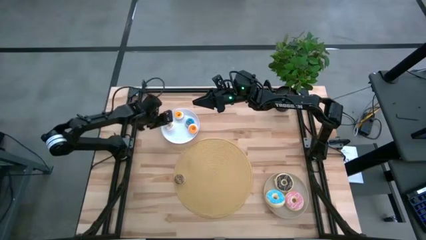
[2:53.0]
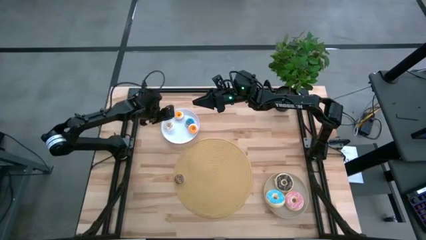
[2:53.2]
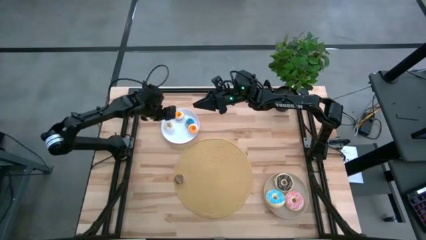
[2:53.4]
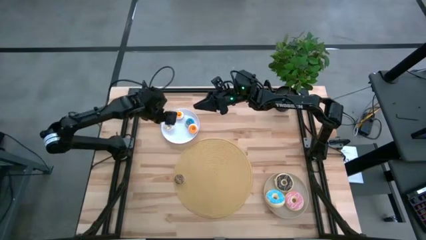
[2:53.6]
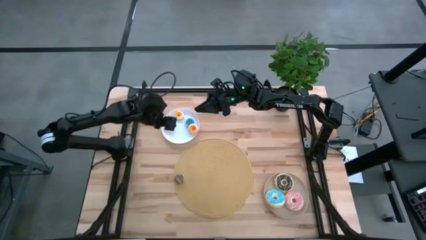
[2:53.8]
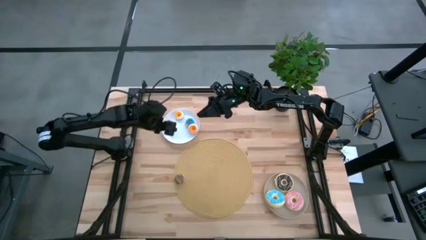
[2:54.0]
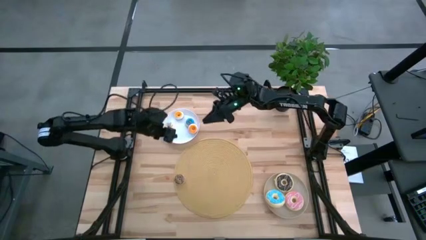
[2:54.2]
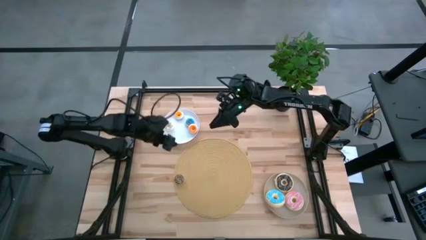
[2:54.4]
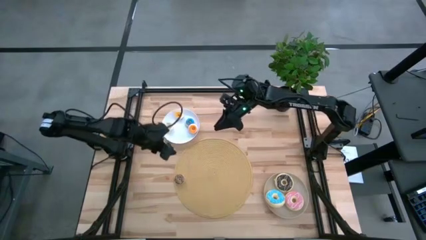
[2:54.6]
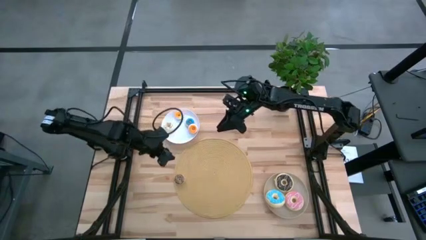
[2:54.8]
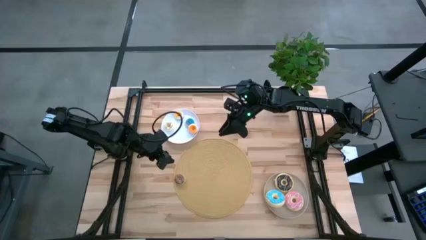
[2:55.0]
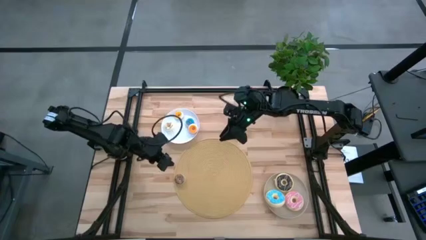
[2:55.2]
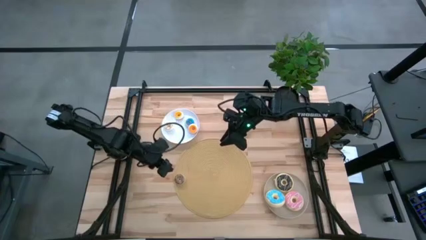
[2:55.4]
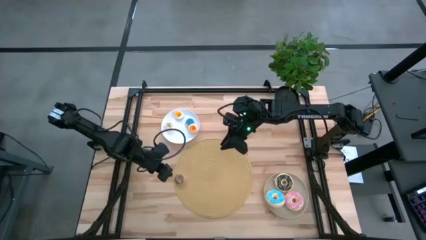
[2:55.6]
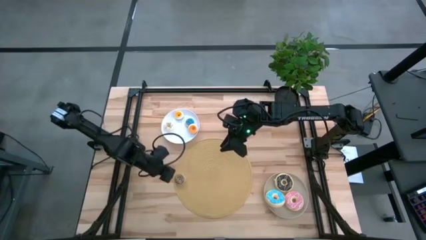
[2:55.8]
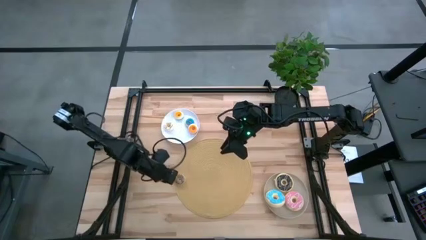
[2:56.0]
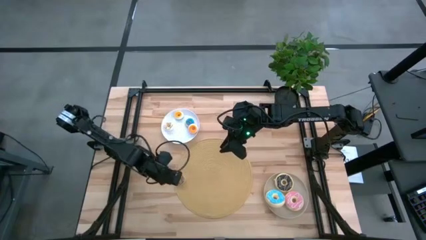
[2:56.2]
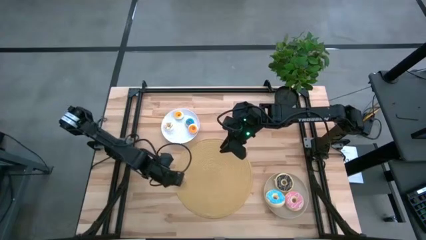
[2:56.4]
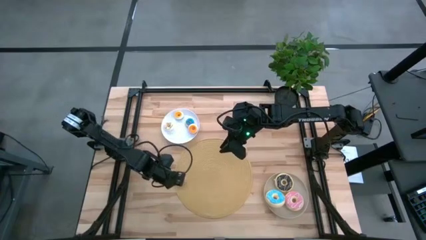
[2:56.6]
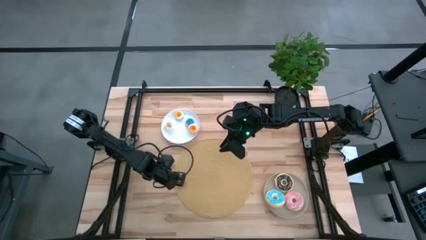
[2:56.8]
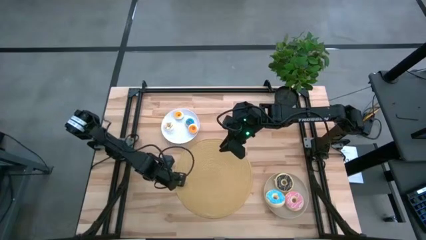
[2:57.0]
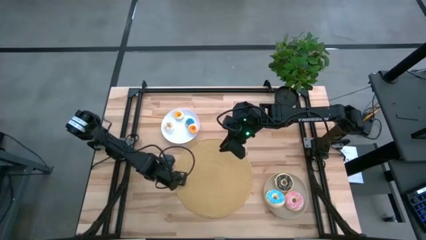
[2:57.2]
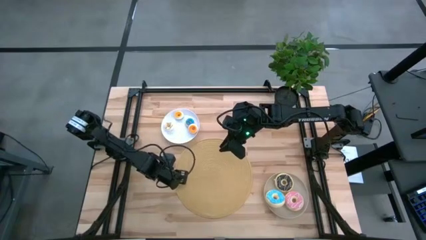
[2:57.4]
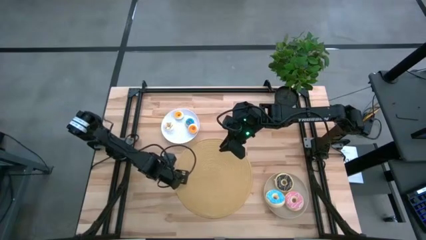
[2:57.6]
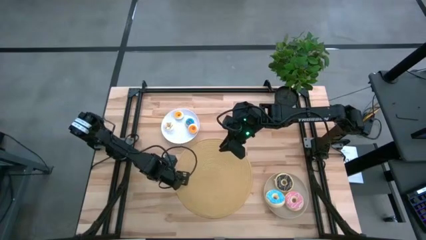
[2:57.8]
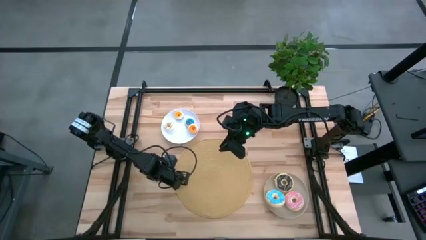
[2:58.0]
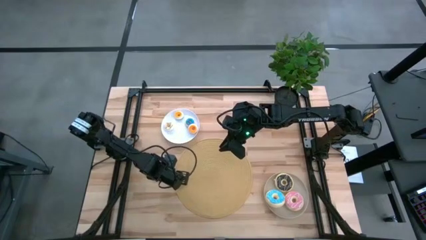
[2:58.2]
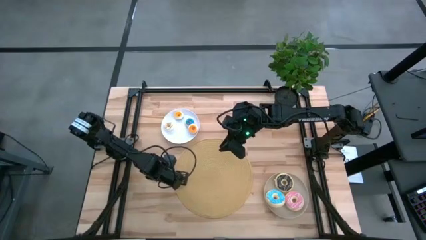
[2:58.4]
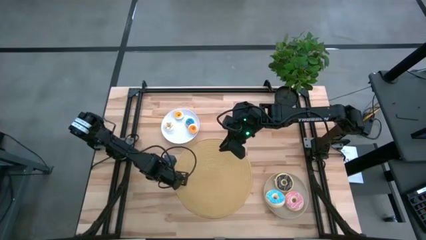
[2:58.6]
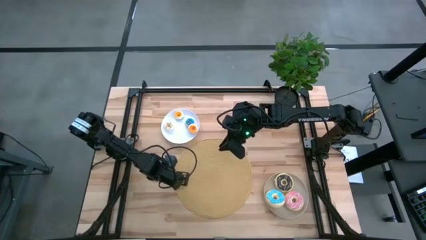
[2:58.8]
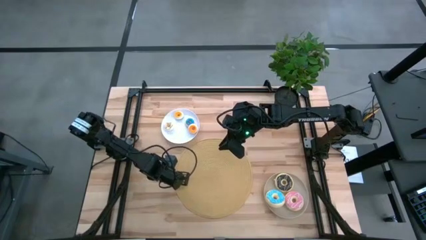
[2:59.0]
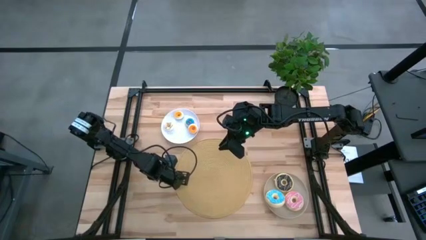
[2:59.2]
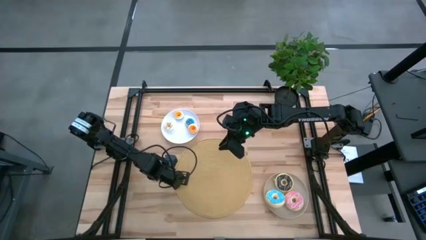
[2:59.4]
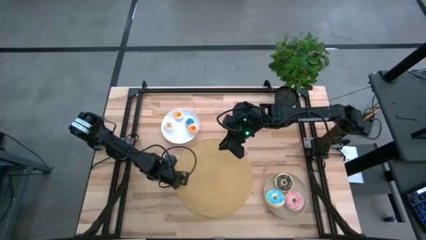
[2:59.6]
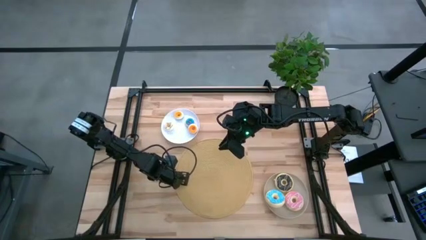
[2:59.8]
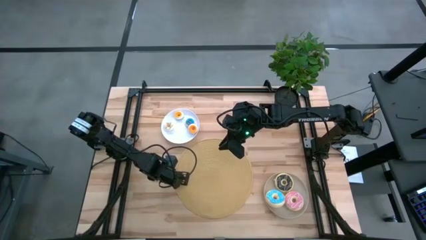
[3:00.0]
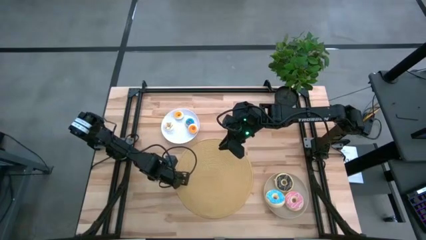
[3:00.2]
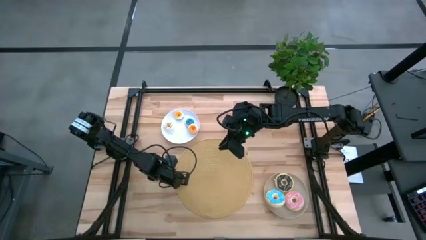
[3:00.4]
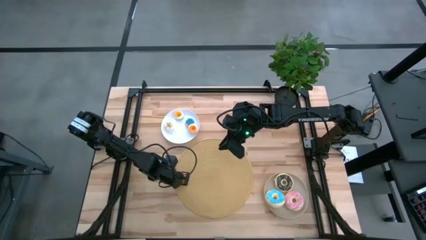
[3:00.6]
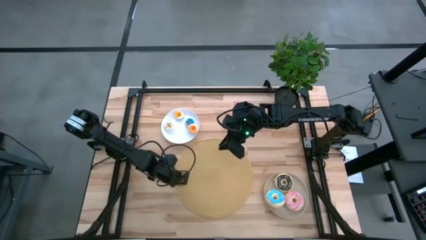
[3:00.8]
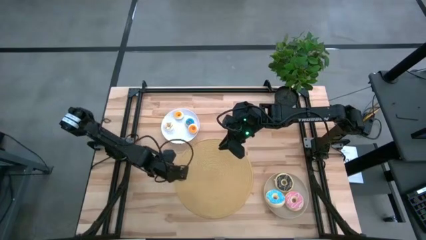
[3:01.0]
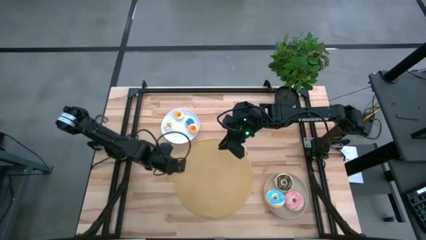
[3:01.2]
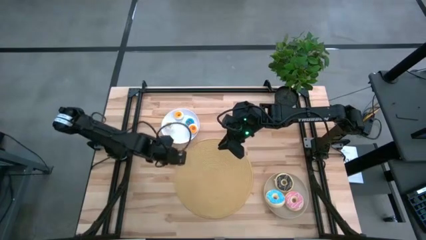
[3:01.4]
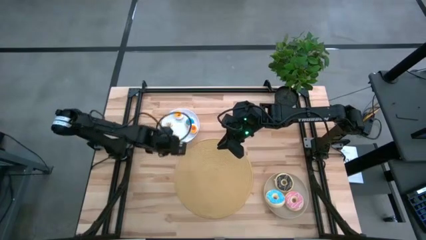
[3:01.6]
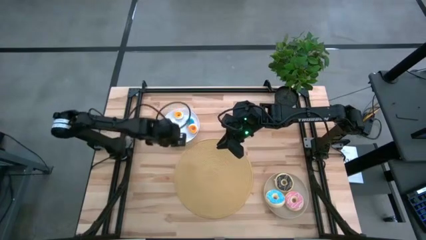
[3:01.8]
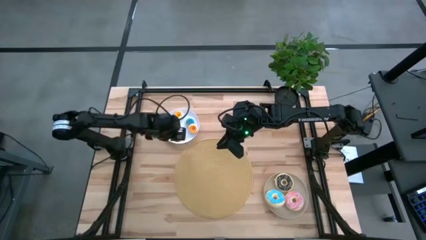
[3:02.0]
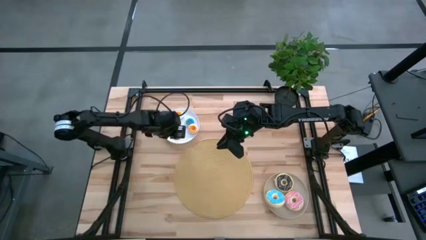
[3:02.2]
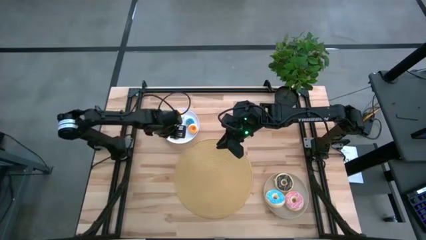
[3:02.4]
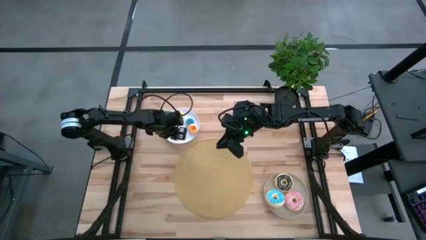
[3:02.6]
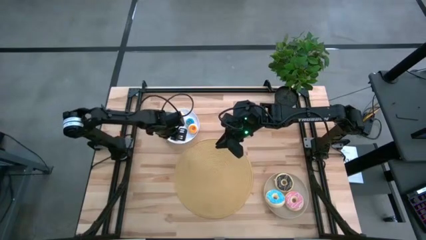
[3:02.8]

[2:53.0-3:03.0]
Task: Pick & Place donuts
Put the small brown donut into the white plate
